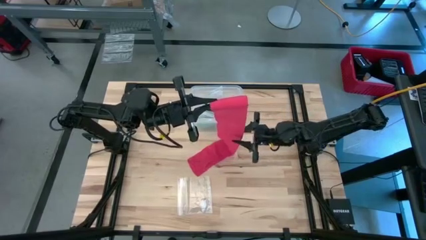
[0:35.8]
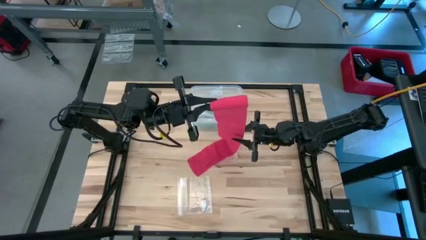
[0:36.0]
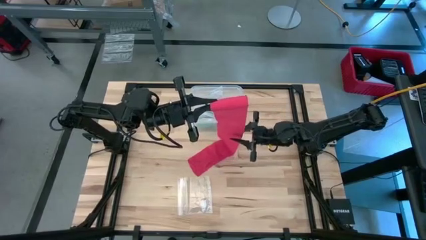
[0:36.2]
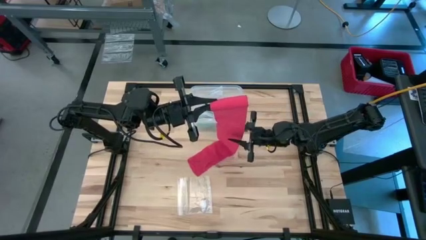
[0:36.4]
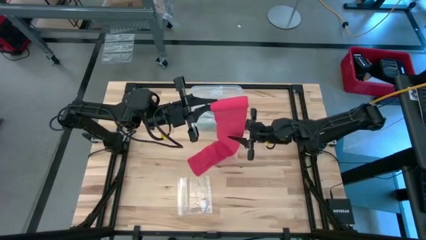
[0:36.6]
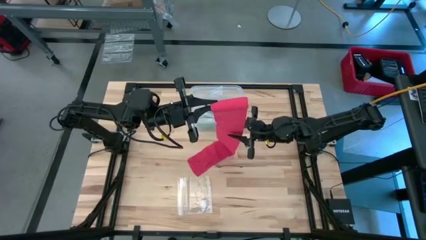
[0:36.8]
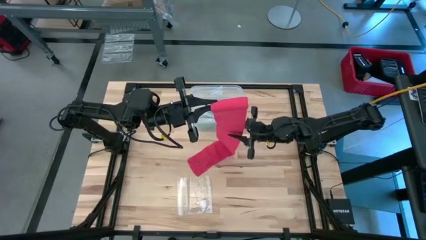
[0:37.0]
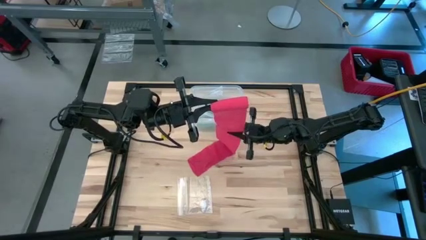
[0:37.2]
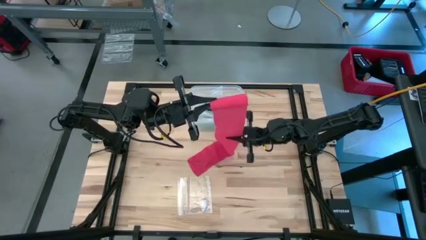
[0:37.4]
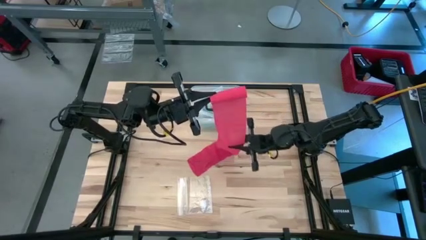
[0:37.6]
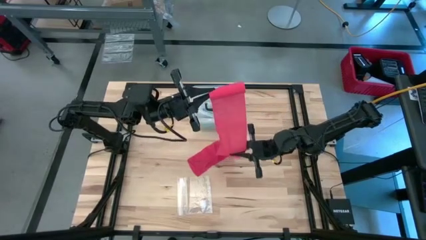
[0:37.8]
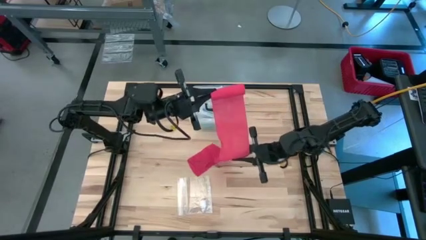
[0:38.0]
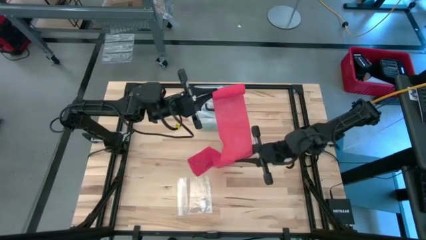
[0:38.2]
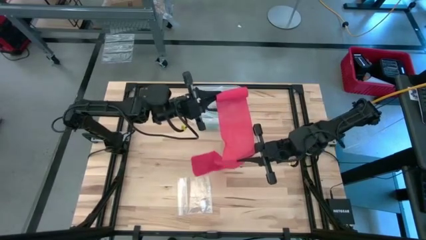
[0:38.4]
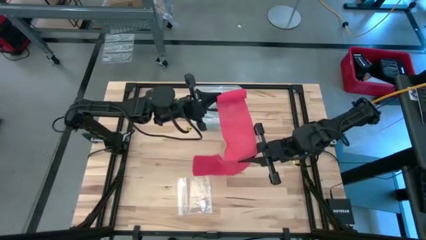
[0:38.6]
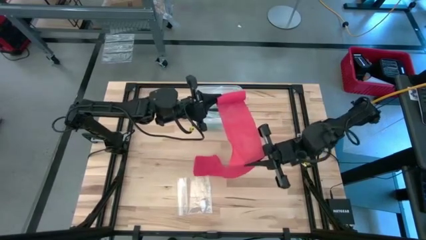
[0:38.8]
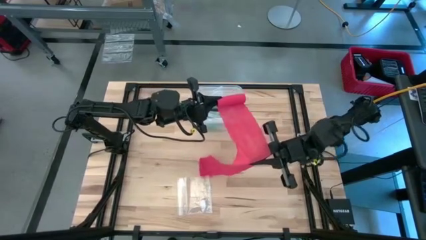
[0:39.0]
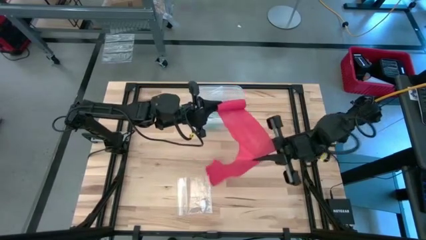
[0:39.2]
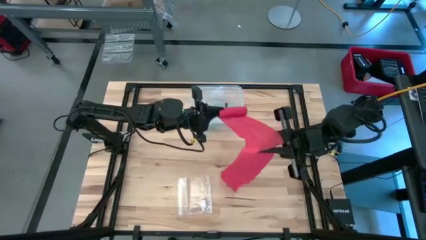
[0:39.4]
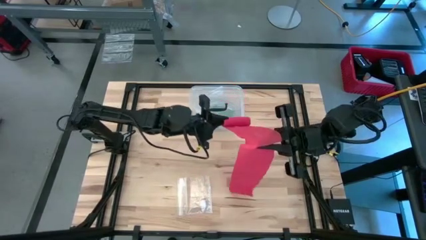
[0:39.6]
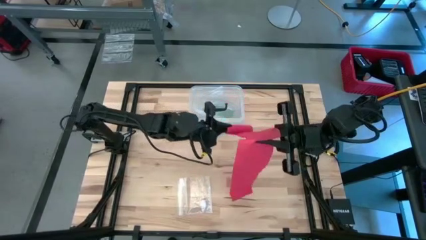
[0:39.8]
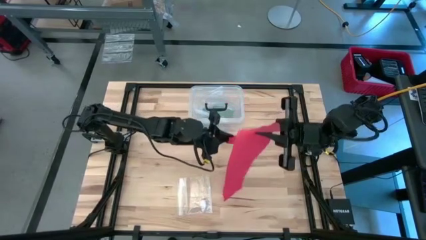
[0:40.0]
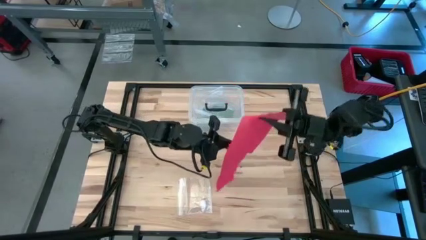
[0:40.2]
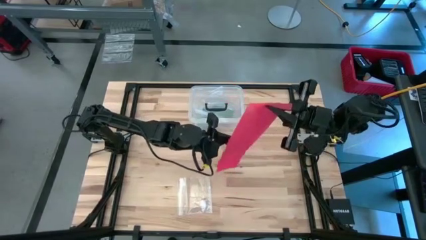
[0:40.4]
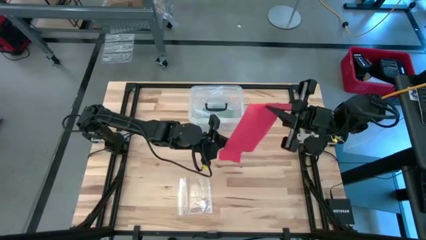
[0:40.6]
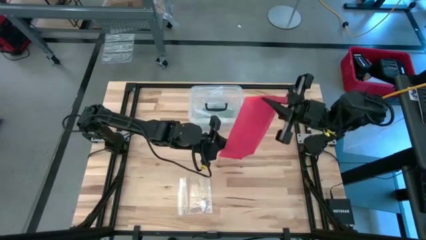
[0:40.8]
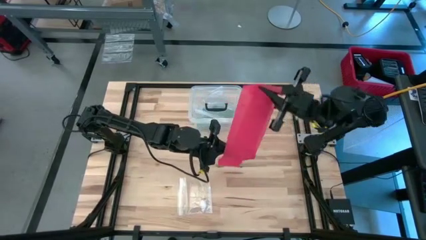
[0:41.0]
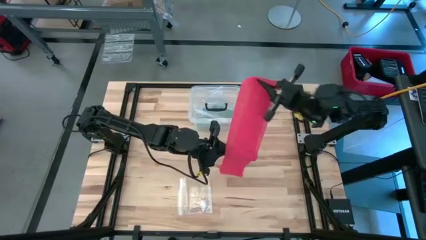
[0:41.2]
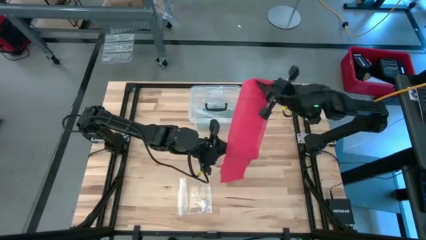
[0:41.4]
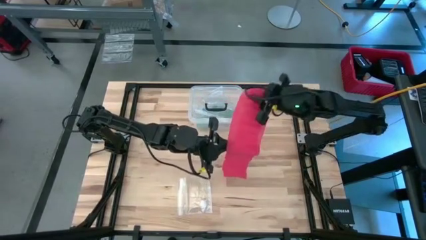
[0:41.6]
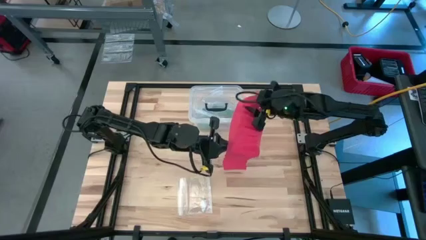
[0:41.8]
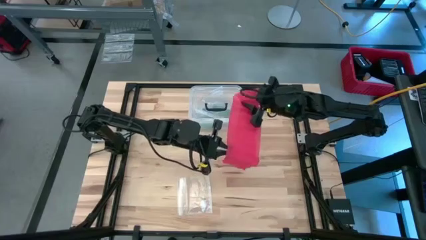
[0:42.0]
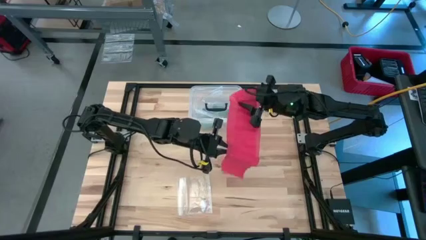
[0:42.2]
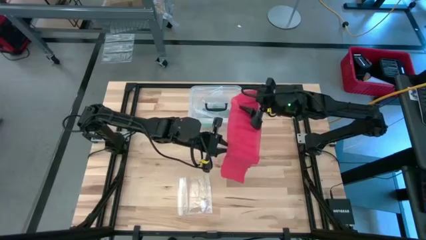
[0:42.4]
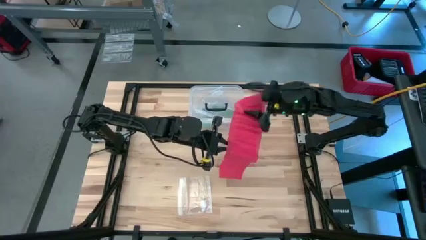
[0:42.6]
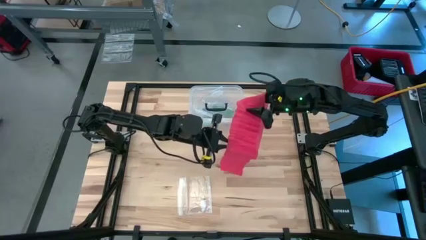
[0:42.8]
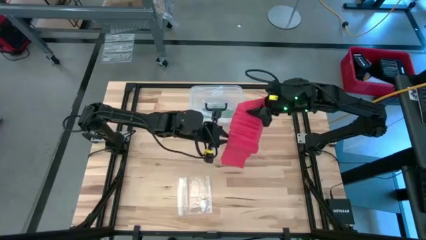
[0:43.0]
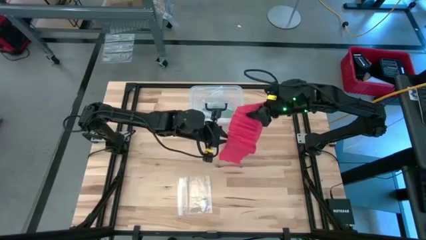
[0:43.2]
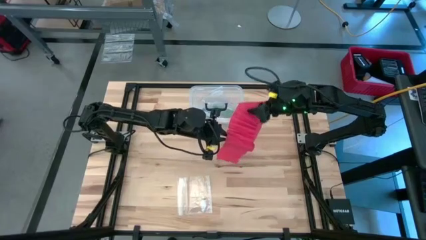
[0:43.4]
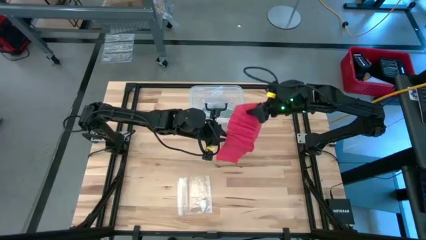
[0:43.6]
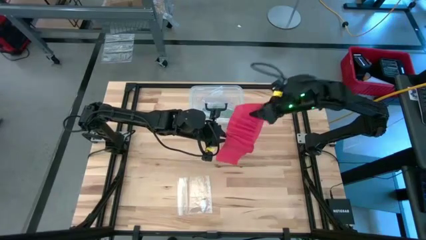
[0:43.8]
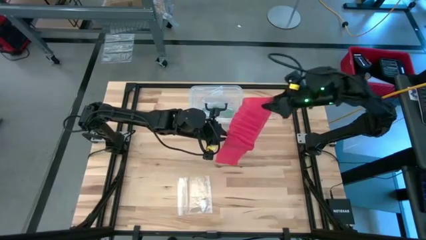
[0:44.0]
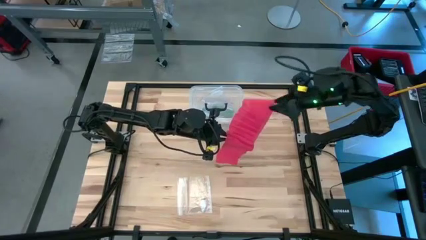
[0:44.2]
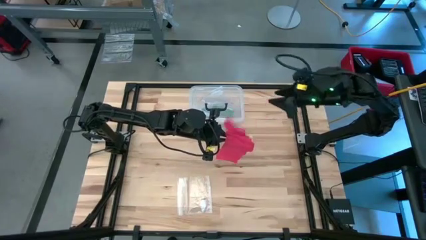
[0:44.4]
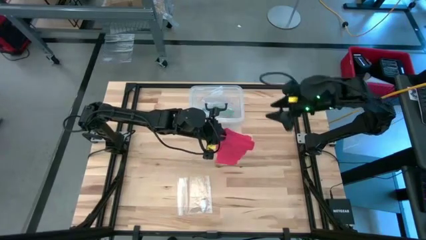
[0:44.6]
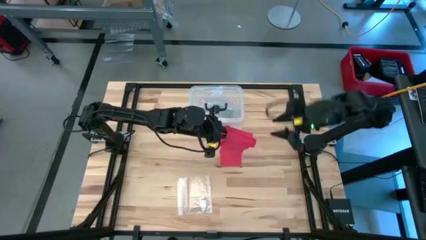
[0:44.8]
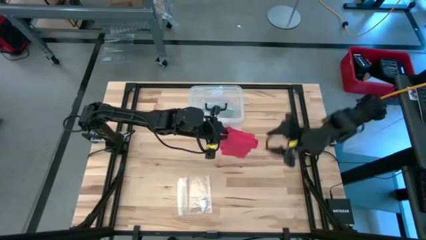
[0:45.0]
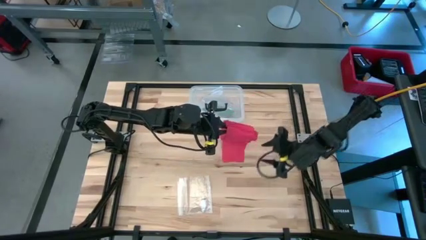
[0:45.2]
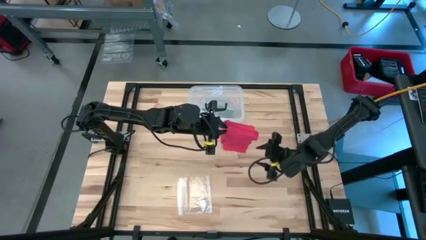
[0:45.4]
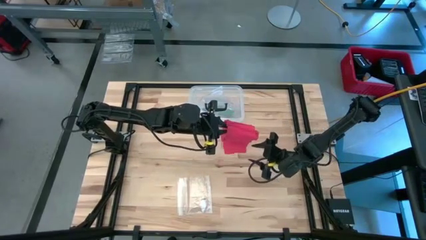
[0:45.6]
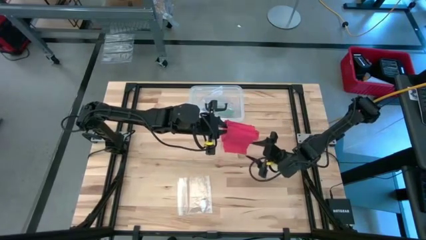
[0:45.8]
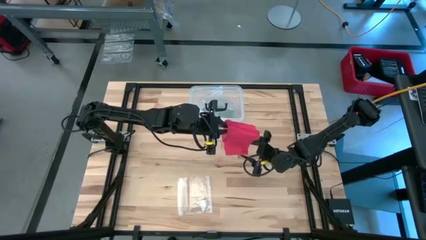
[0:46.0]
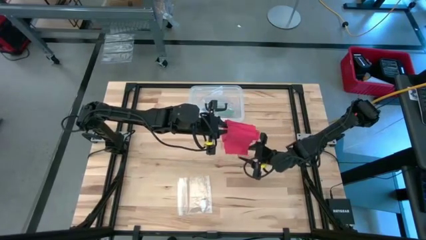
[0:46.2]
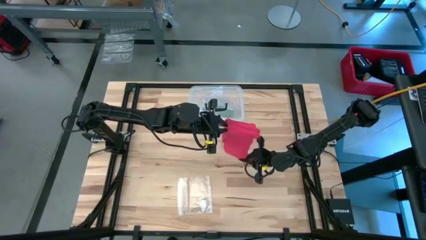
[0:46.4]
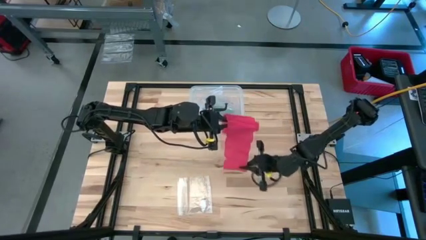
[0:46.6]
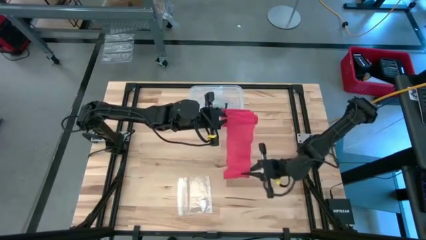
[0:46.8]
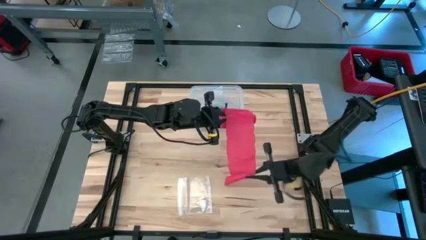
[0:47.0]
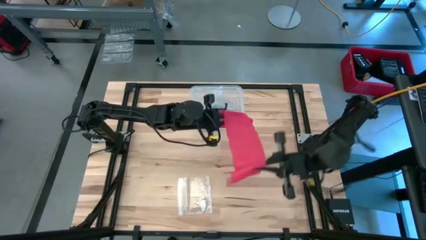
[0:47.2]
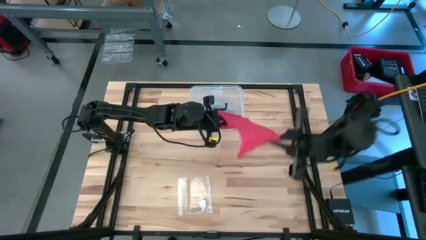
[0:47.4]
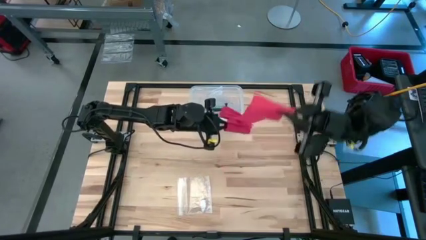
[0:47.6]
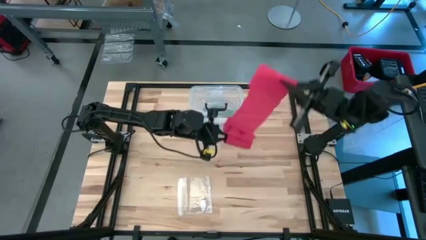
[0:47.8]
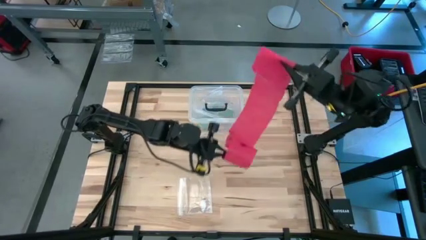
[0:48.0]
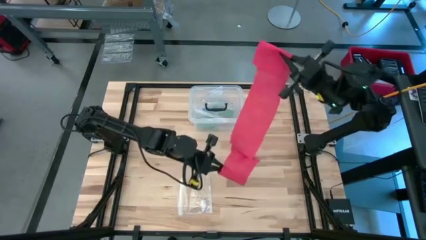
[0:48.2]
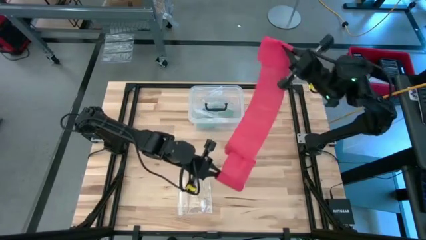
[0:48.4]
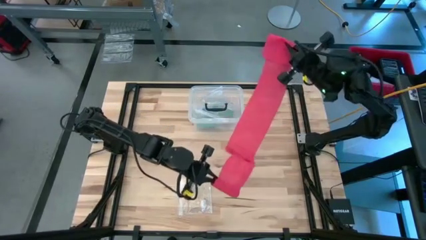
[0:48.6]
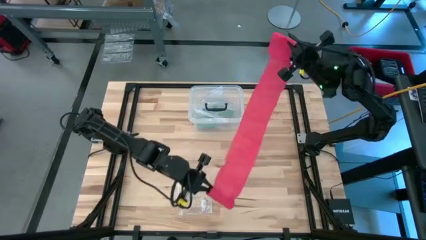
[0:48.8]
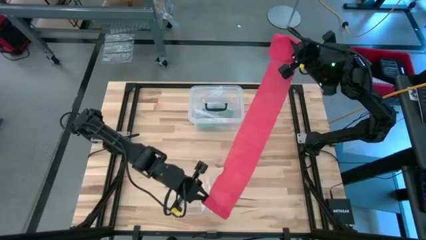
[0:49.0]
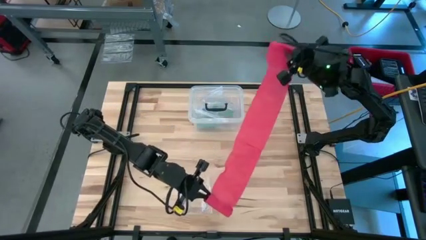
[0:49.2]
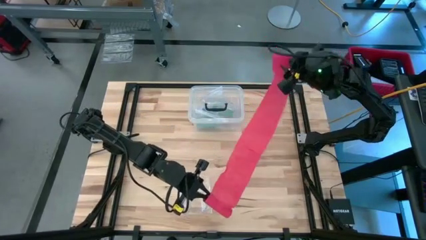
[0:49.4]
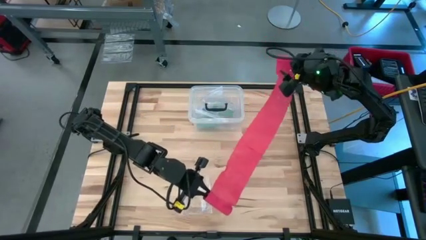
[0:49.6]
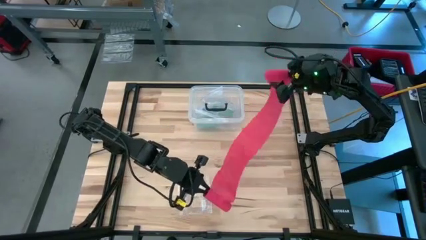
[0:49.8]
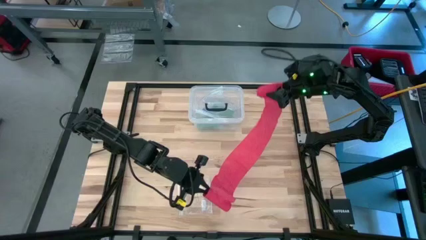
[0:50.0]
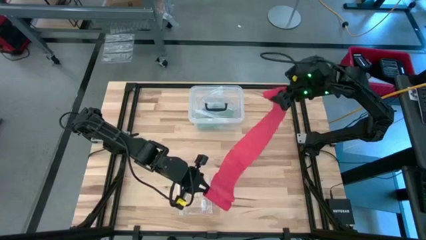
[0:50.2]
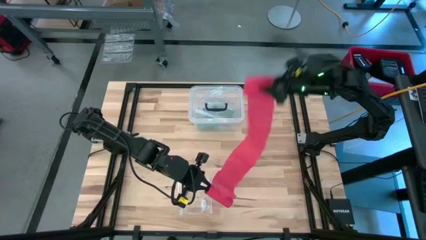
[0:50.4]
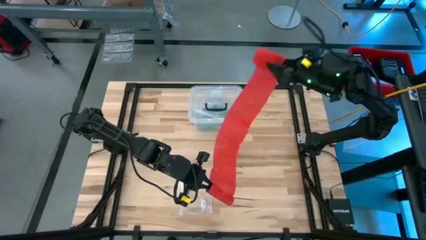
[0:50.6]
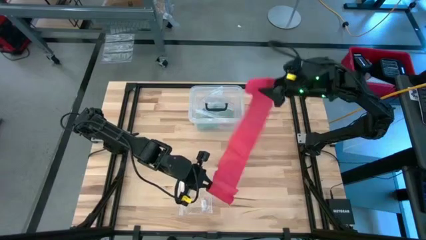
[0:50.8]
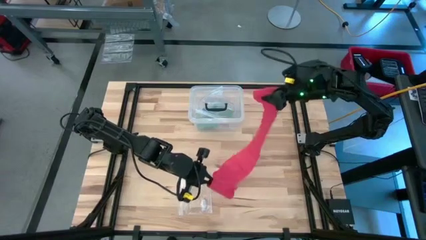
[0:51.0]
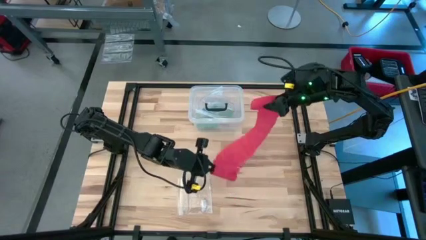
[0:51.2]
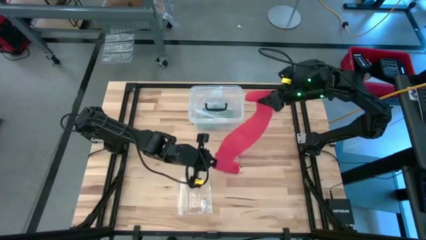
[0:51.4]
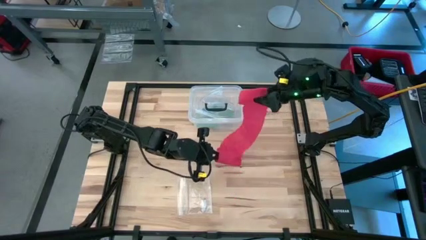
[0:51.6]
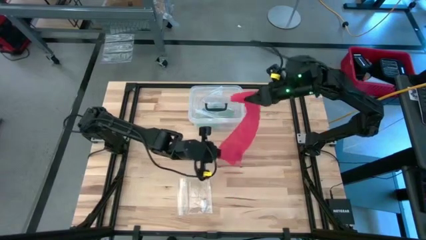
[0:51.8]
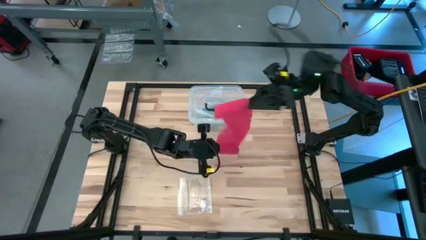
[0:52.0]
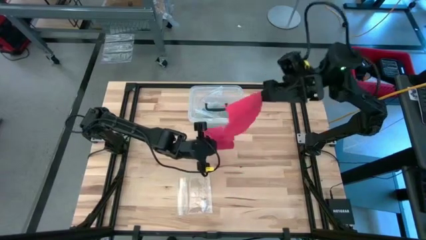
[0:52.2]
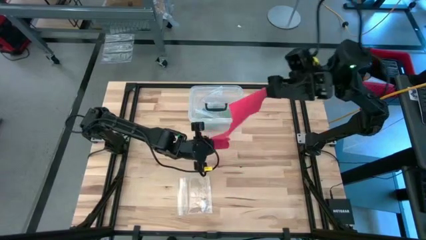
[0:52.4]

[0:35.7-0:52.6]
Task: Roll bandage
Roll the red bandage
